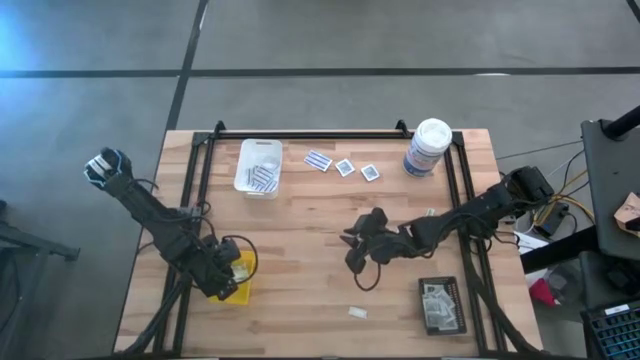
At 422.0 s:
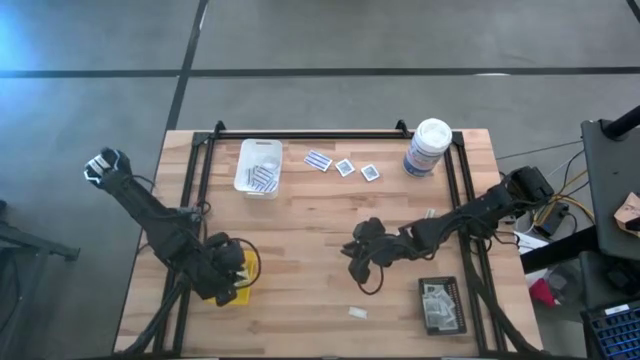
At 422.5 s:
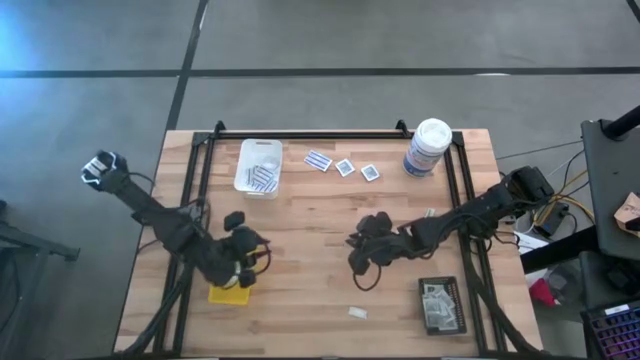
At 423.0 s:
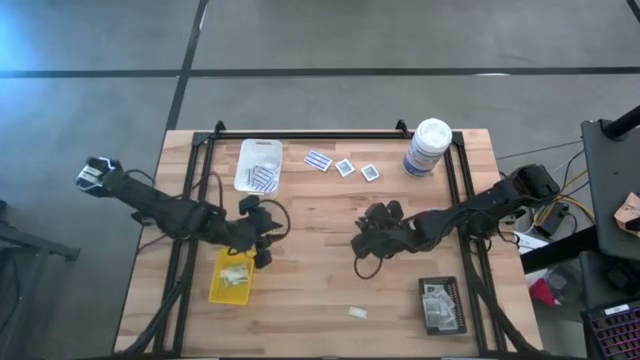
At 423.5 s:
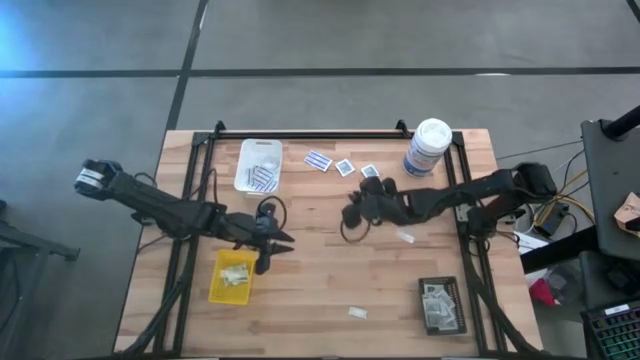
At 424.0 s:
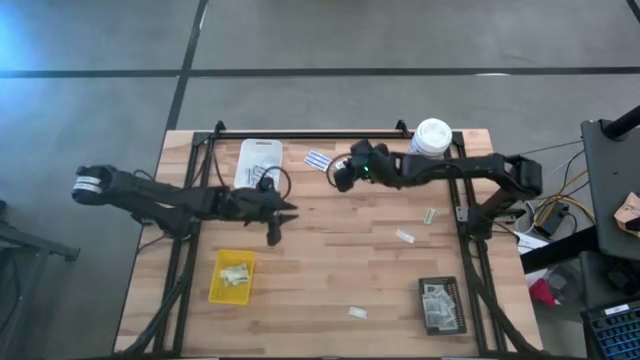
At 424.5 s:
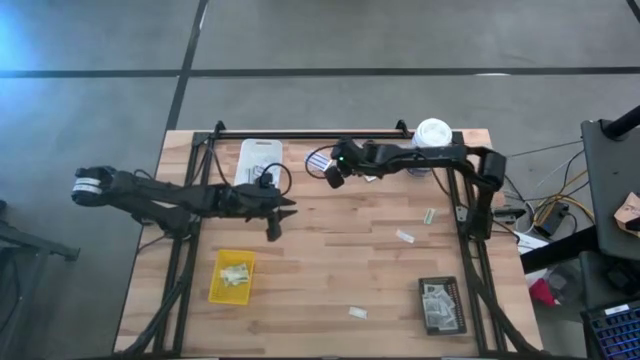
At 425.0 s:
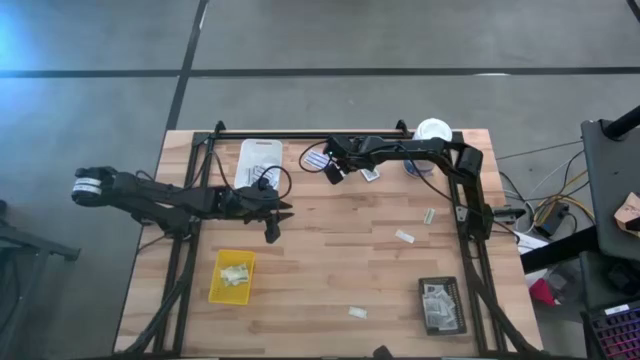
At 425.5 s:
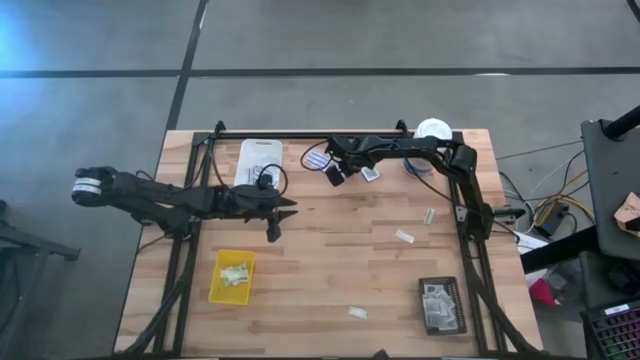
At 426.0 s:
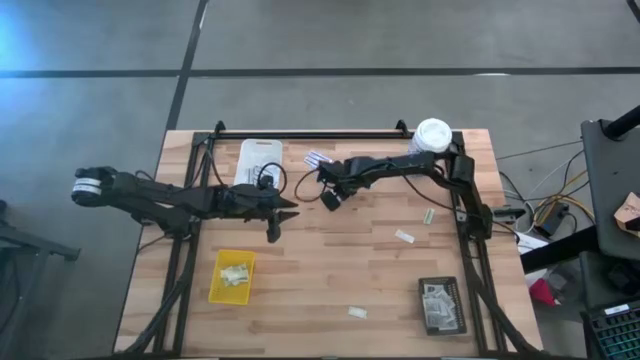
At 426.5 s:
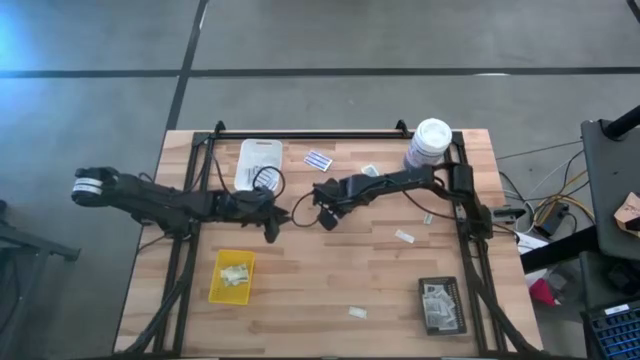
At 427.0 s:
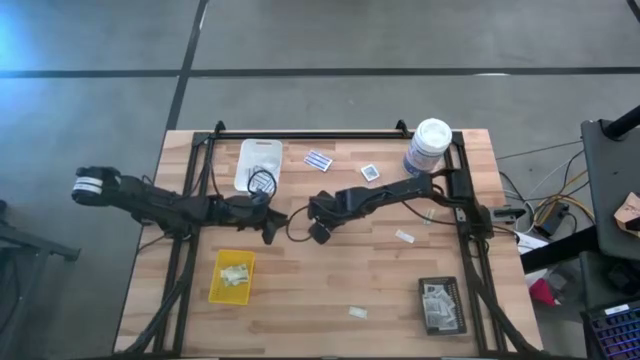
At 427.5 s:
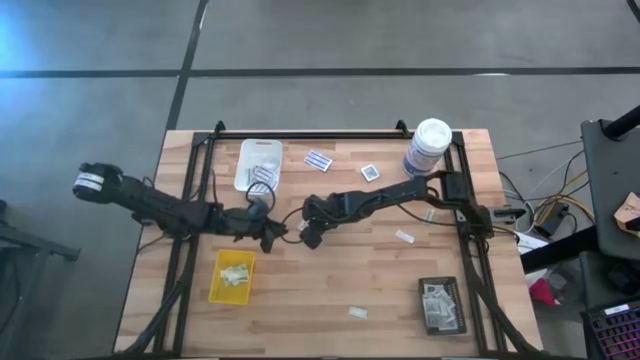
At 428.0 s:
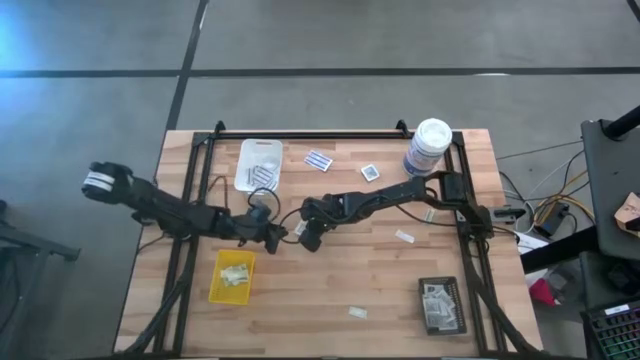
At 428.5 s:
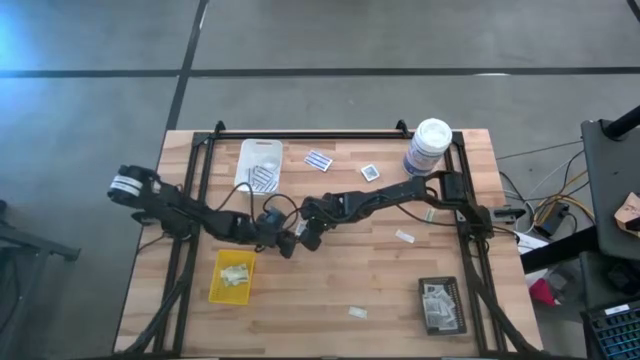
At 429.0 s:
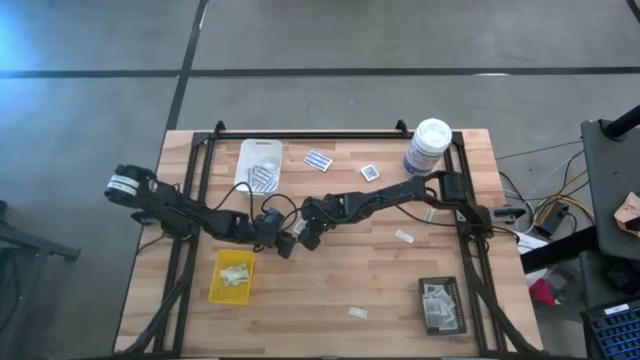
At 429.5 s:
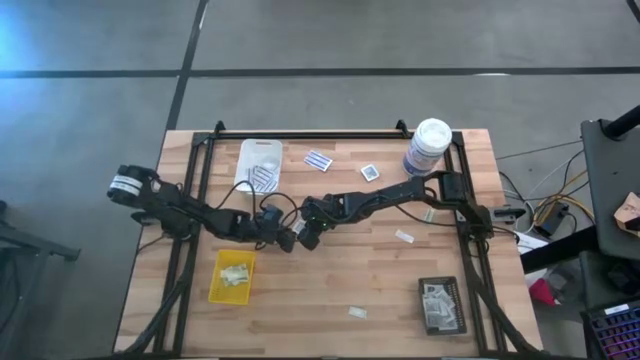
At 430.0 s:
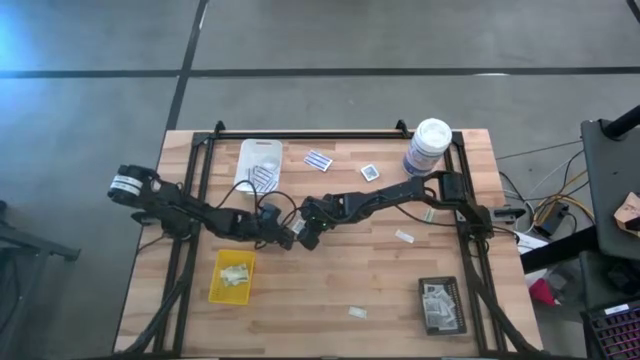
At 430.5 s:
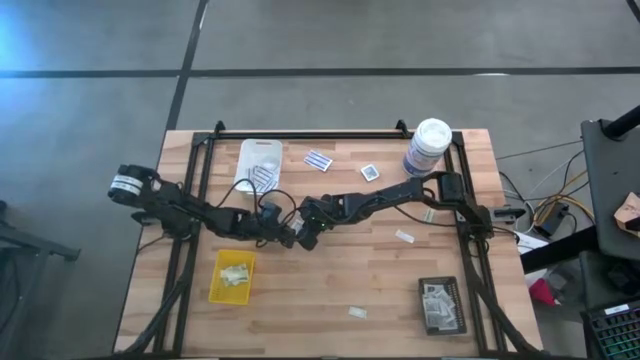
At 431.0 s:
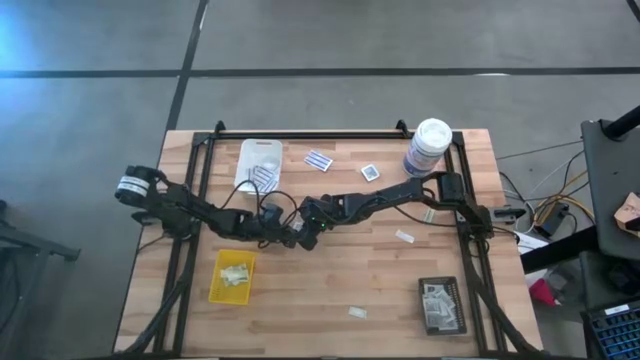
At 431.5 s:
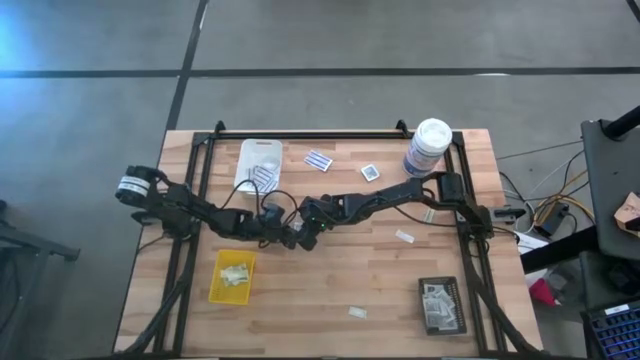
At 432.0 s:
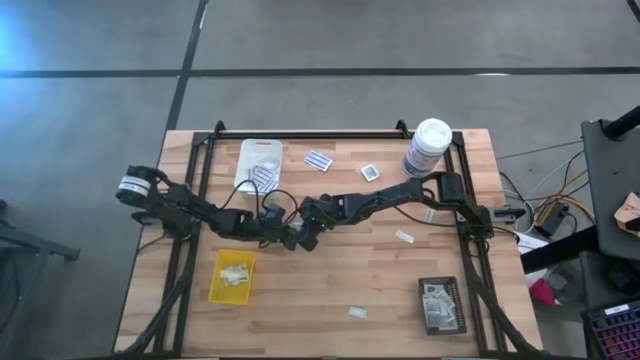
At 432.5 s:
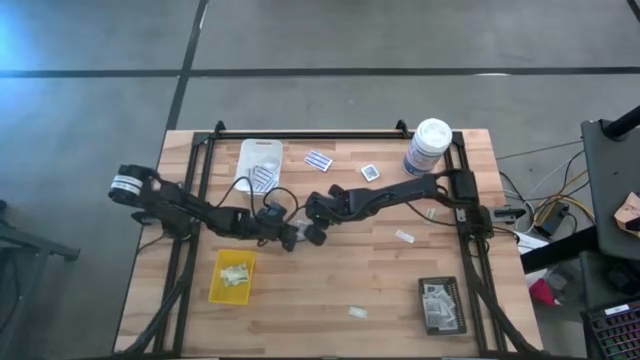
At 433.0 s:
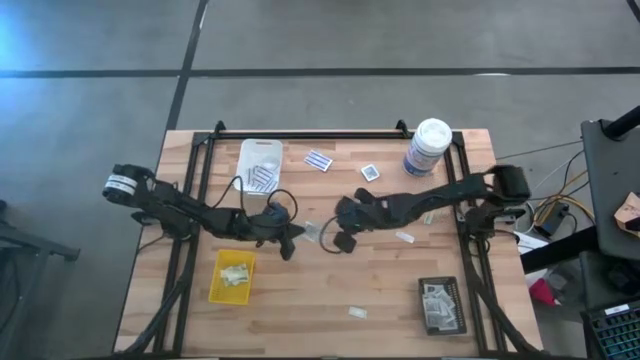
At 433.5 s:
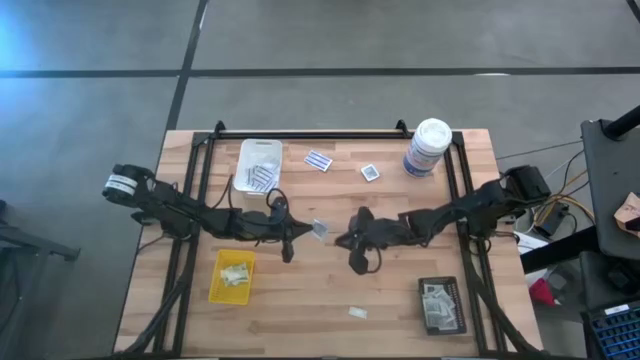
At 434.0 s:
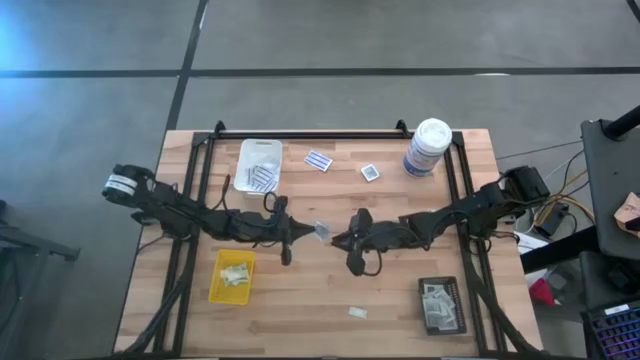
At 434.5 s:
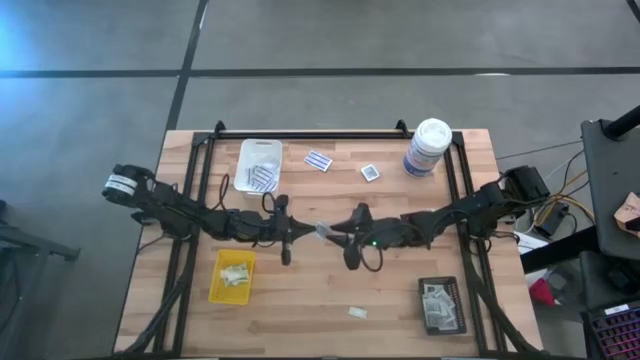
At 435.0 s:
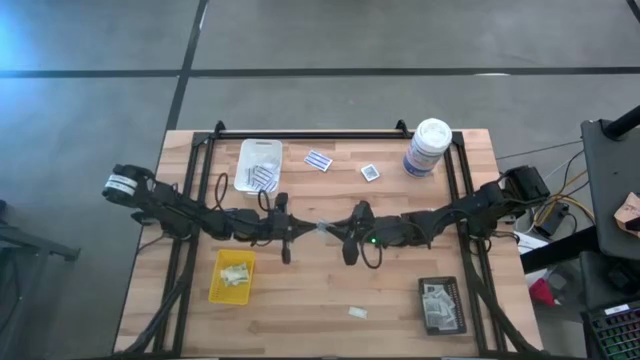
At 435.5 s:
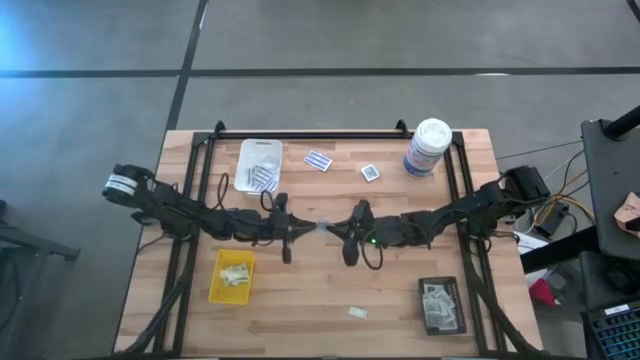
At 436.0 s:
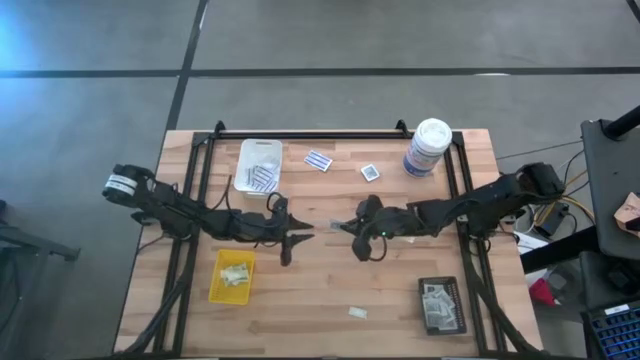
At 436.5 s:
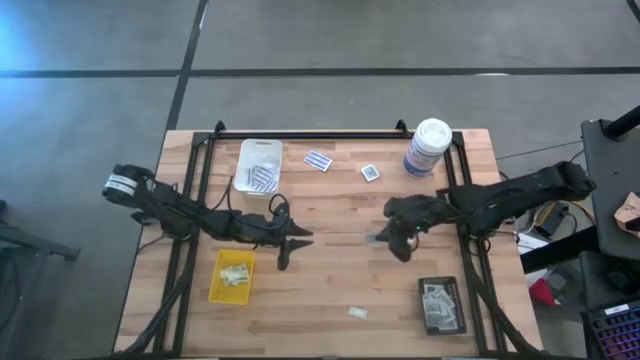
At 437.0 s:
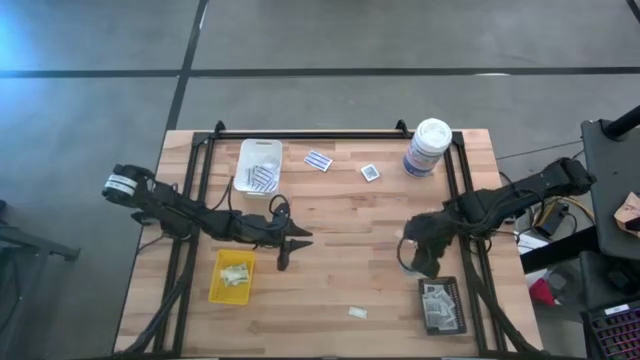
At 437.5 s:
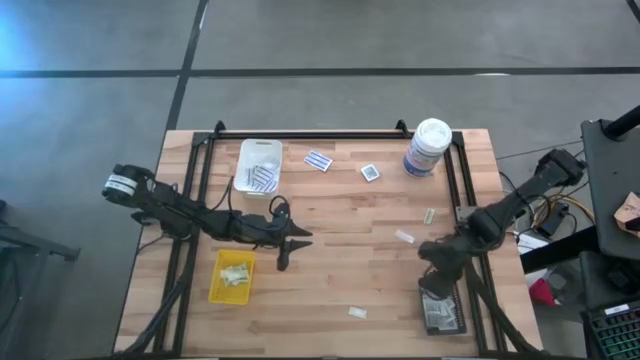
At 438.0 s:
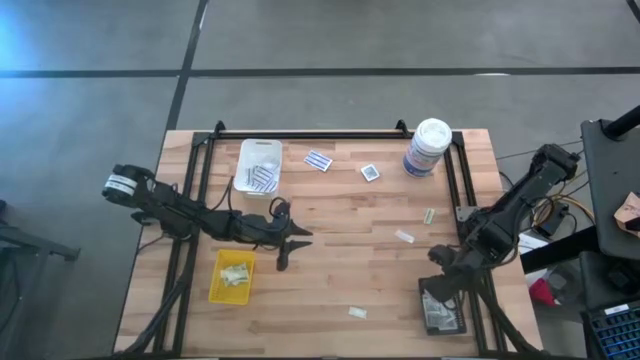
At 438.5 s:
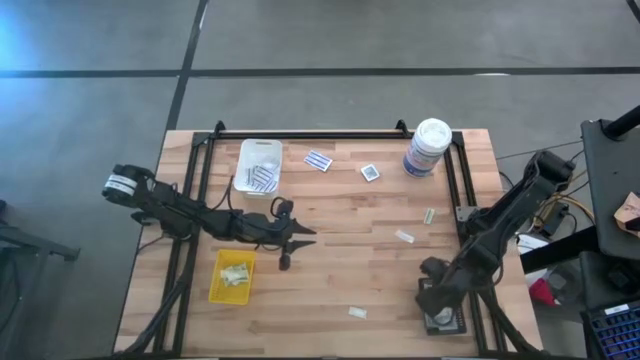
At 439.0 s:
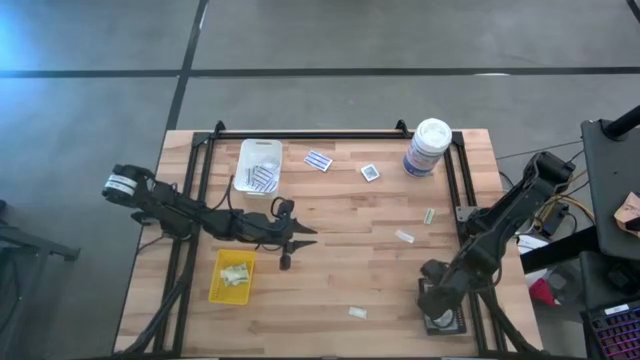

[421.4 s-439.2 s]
Task: Pick & Place First Aid Supplies
Put the towelette pack into the black bin

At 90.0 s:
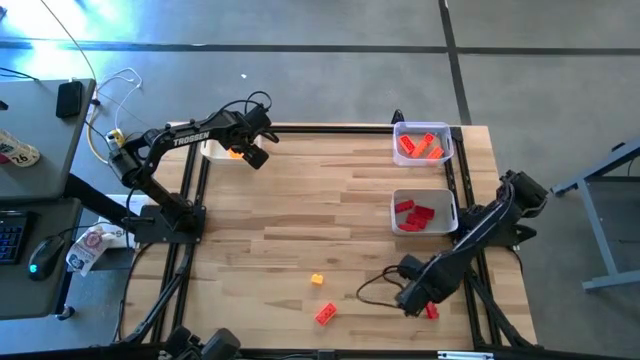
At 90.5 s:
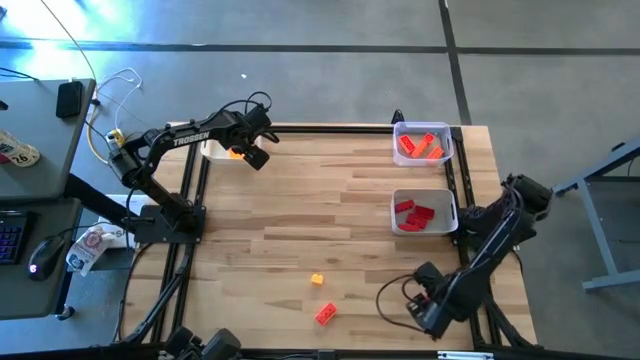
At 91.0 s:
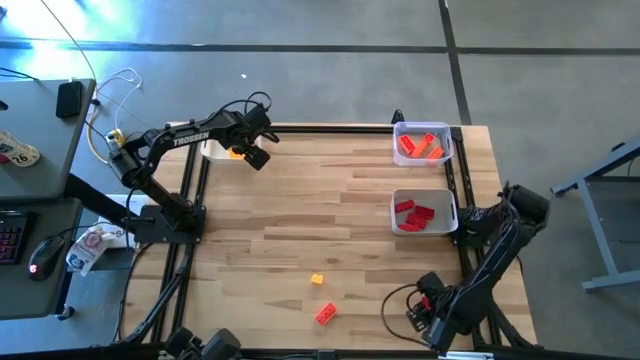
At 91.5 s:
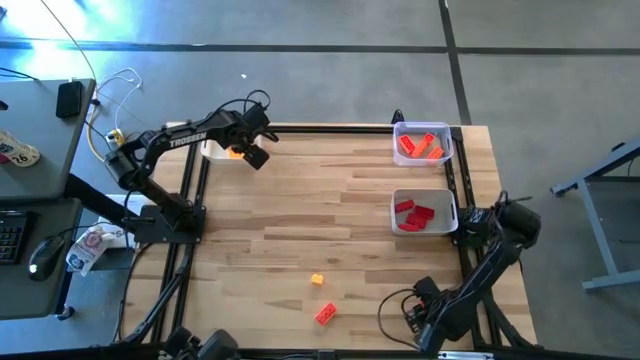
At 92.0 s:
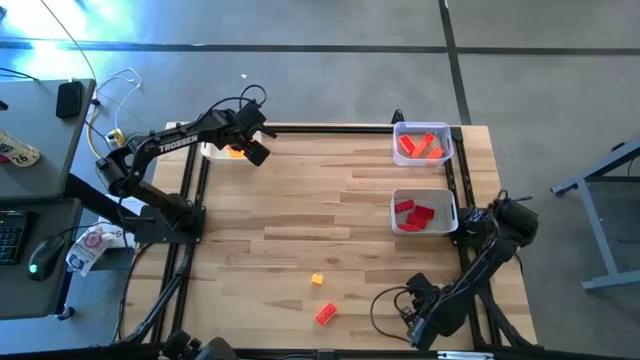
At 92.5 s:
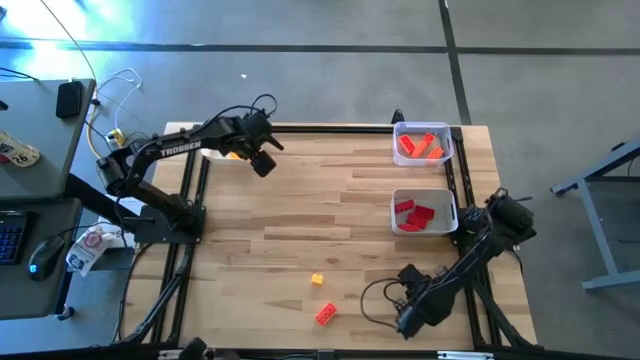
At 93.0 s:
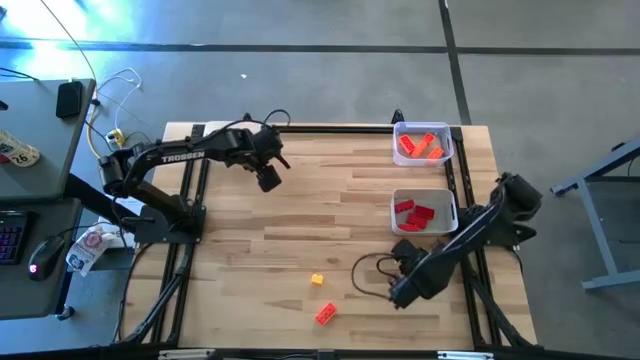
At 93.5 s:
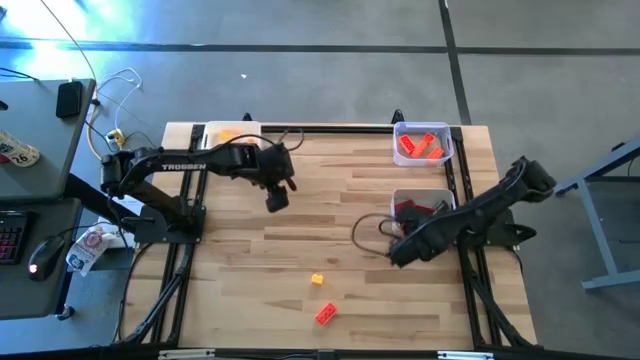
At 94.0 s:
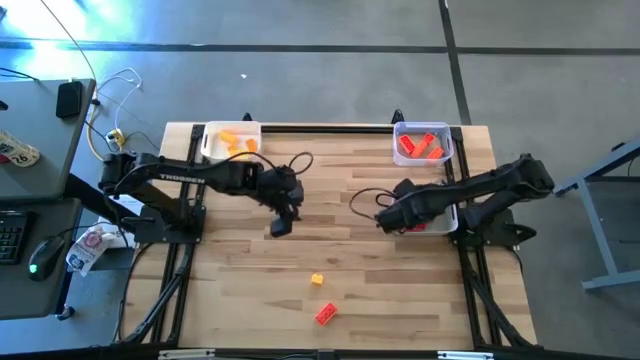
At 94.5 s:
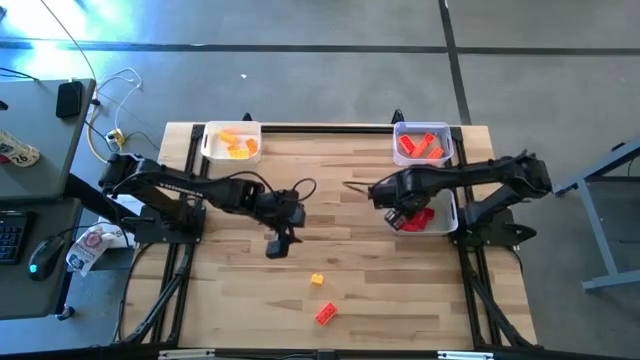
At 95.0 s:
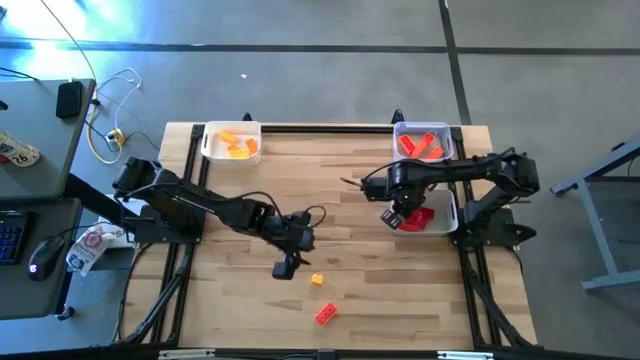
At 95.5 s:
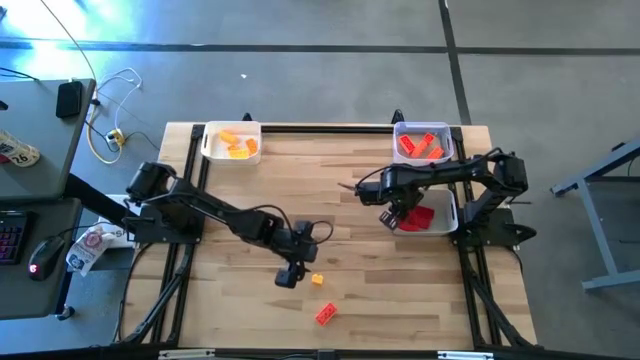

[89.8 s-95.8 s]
Task: Sort & place blocks by color
Put the red game piece into the gray bin
